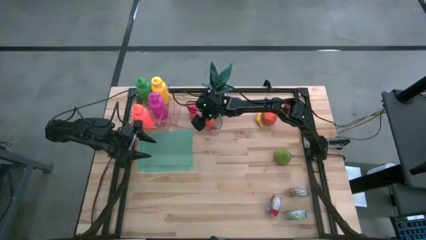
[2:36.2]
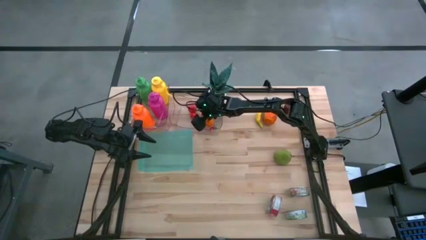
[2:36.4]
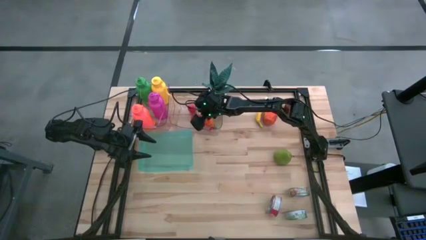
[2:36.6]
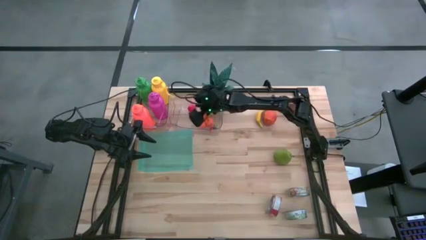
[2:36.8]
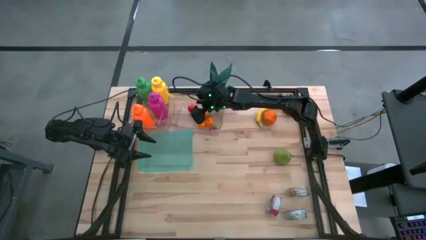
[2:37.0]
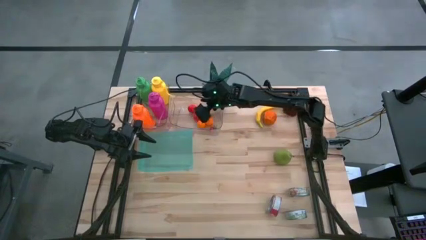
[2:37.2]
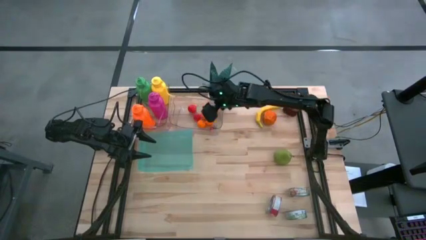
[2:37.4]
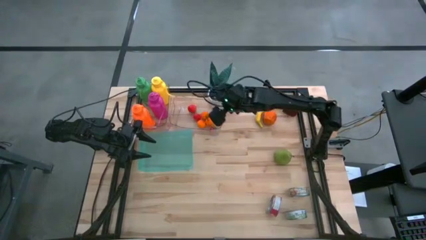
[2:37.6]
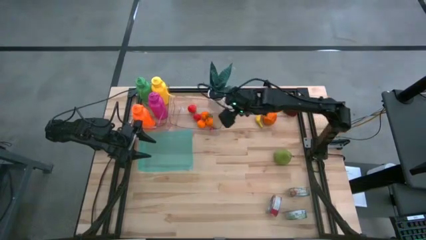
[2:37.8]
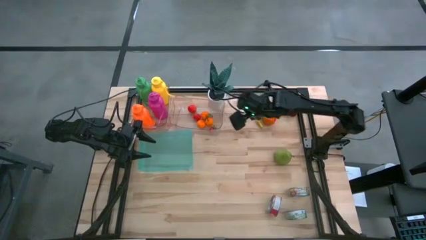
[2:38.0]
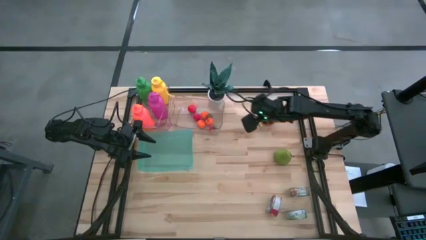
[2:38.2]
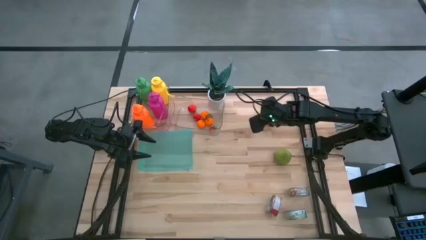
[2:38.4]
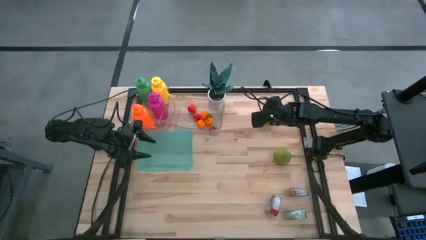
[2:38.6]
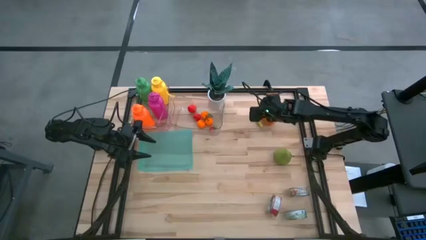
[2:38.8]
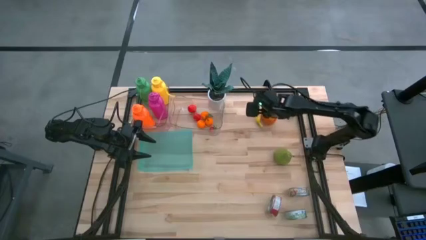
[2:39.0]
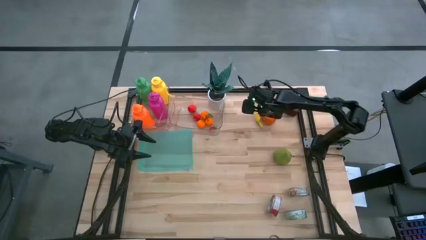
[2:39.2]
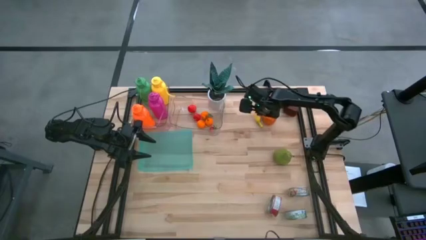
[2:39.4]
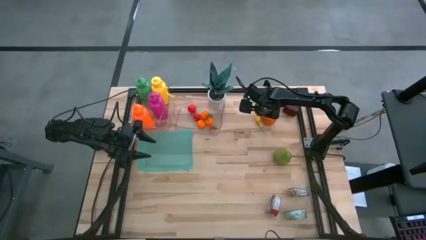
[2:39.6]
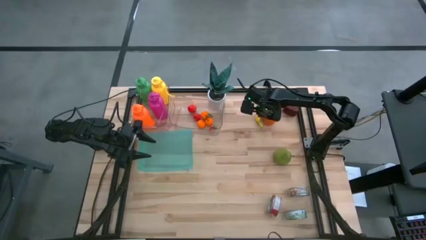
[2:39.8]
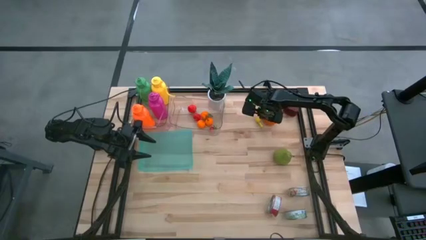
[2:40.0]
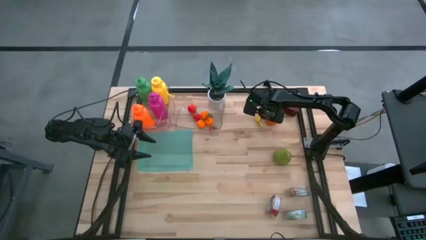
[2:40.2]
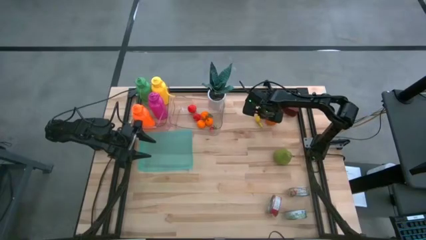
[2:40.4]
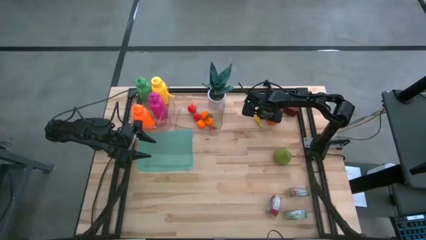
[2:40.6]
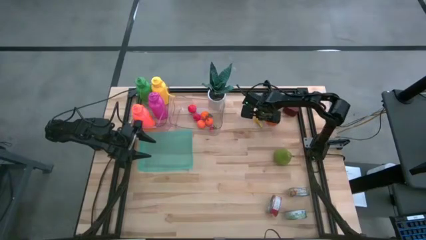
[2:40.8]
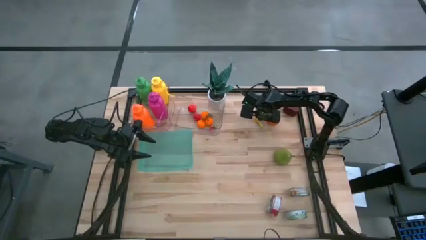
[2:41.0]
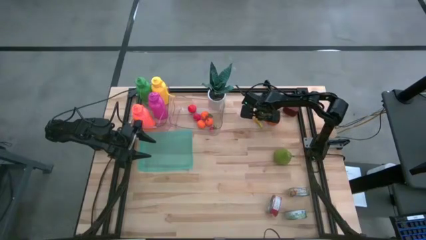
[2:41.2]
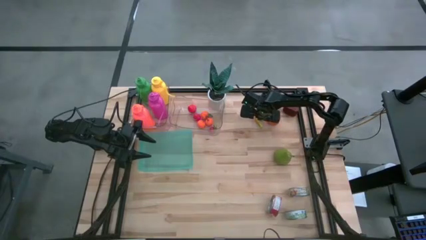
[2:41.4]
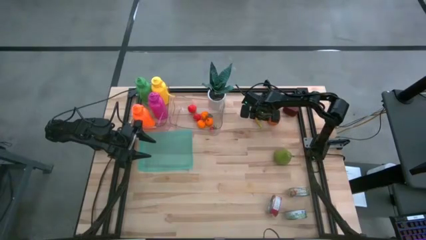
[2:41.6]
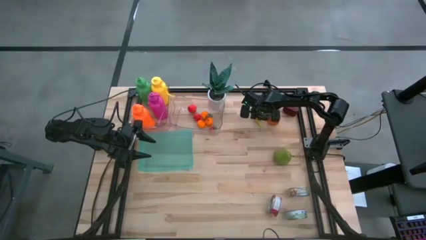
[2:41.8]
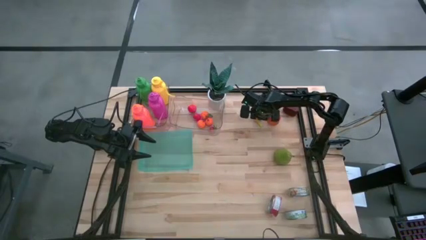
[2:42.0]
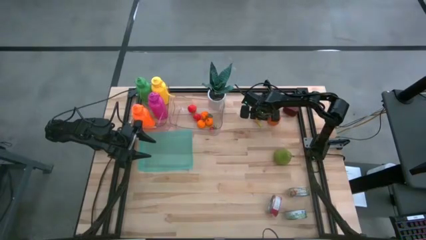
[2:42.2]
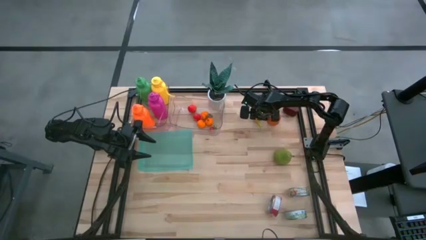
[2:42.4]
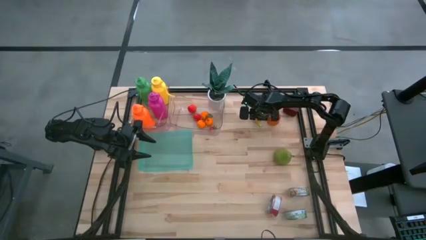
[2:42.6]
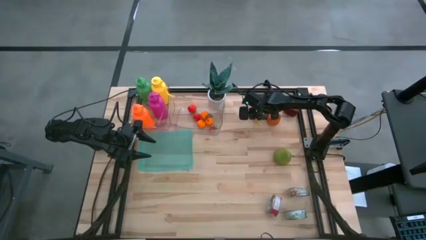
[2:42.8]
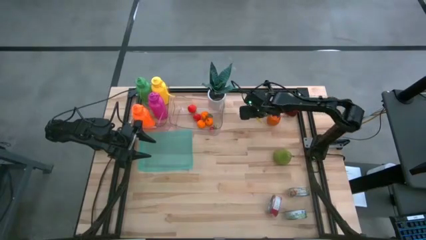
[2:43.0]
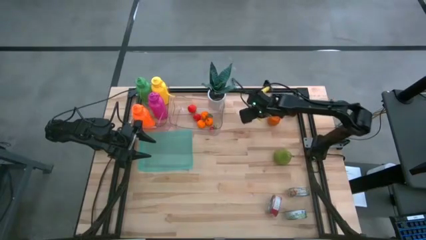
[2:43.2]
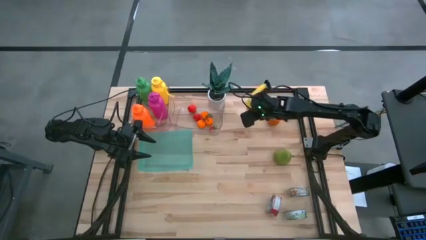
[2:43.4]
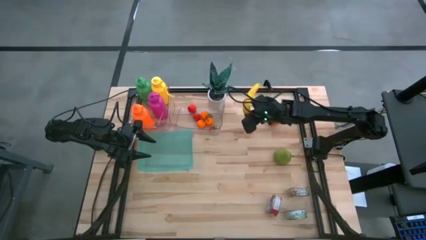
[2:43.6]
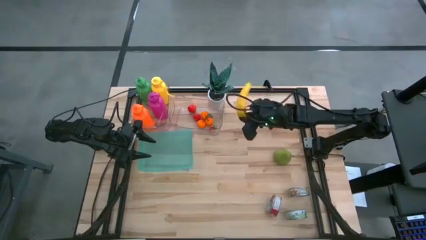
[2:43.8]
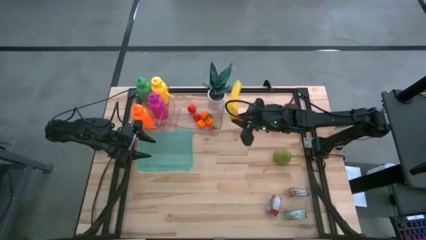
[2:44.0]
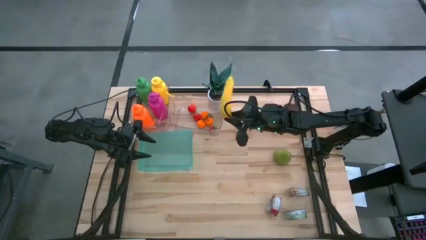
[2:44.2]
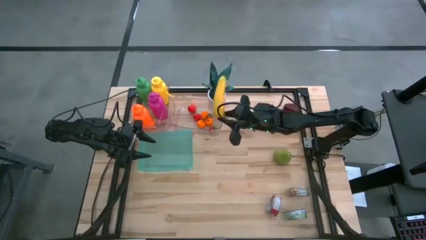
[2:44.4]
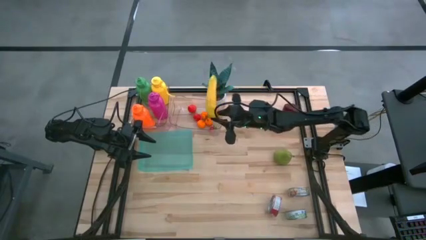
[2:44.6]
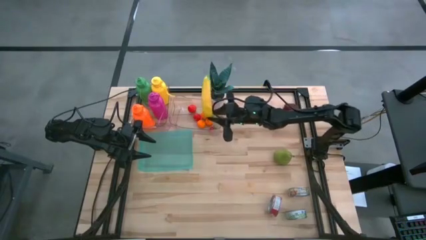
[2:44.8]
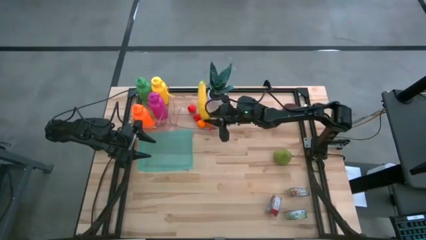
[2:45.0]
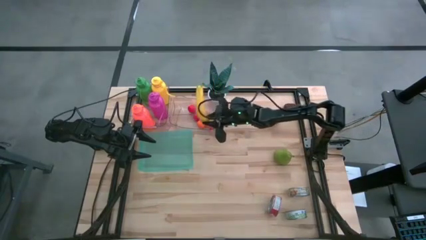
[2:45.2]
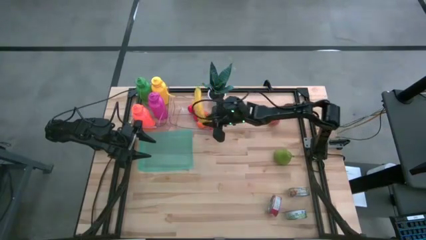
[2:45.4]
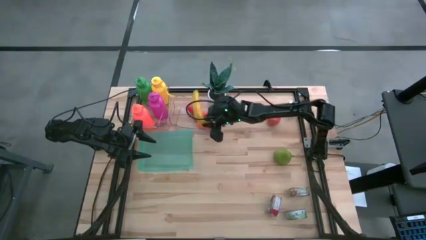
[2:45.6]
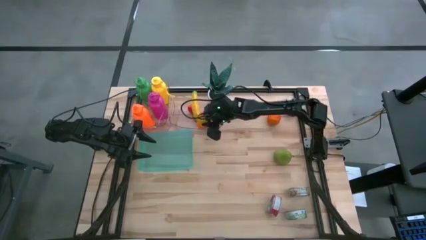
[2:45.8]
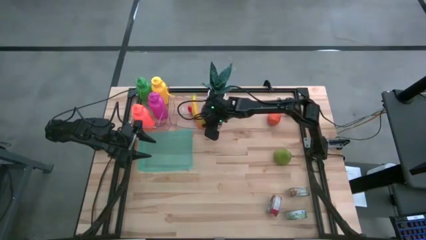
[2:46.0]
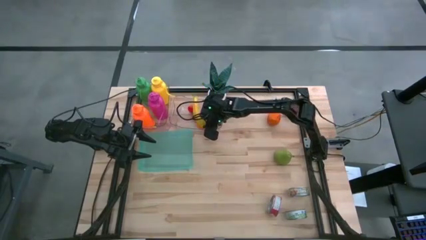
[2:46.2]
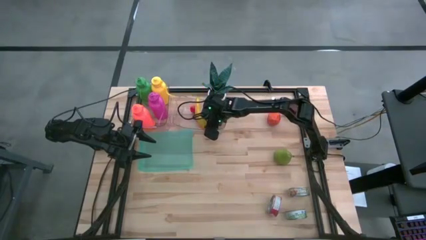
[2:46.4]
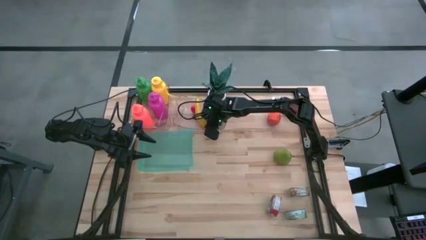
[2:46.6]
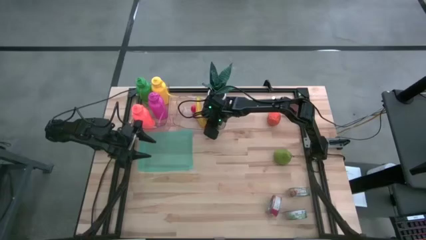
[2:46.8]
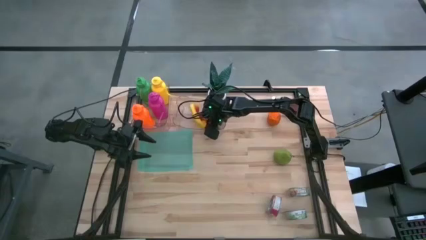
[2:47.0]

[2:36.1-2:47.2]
Task: Pick & Place Food Item
Put the yellow banana into the right transparent bin

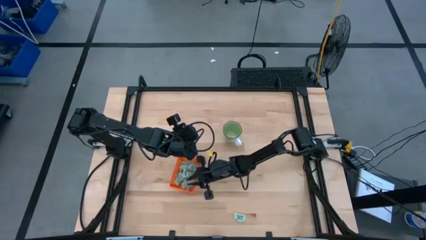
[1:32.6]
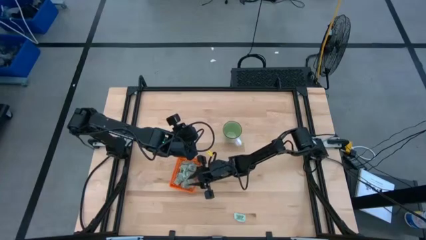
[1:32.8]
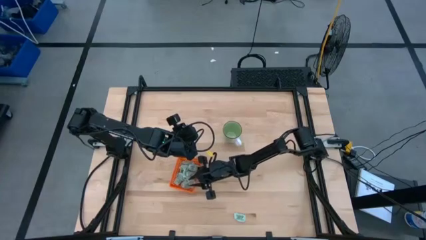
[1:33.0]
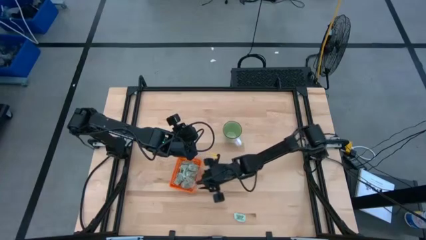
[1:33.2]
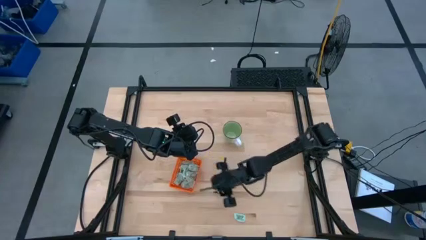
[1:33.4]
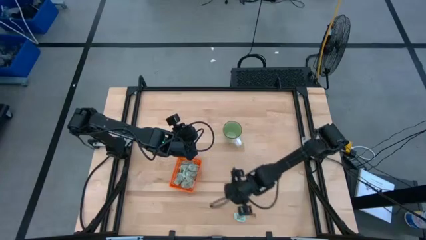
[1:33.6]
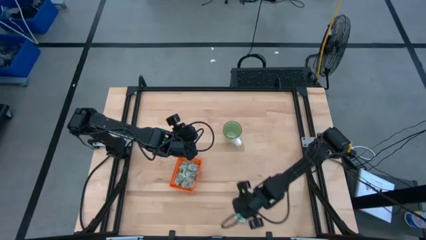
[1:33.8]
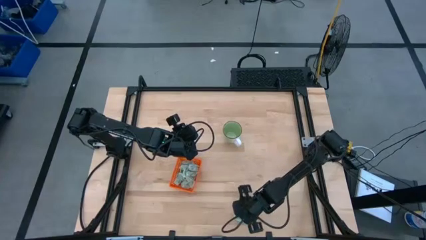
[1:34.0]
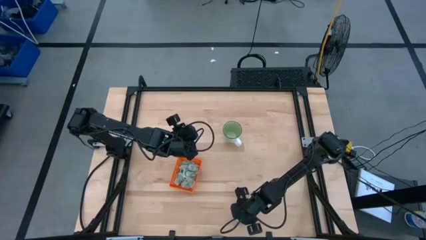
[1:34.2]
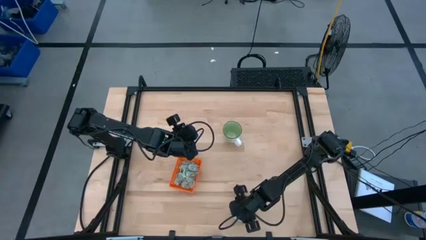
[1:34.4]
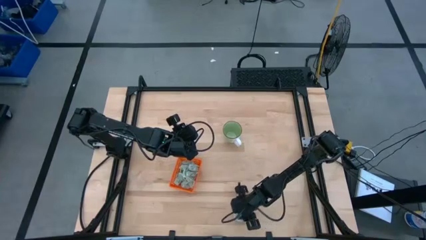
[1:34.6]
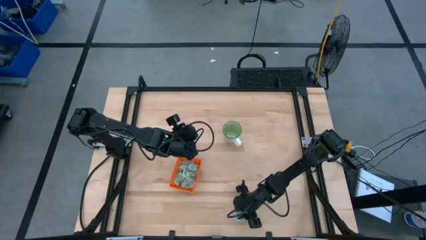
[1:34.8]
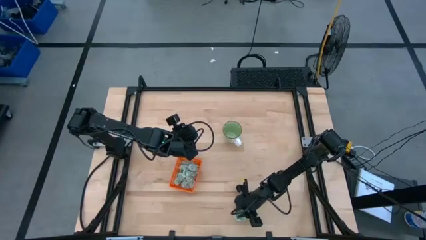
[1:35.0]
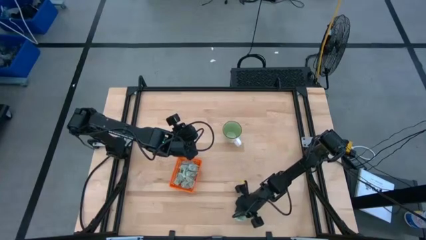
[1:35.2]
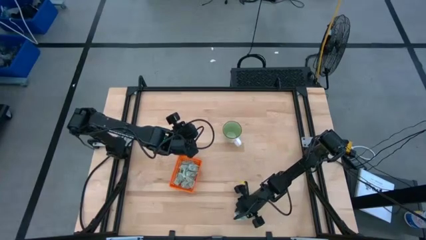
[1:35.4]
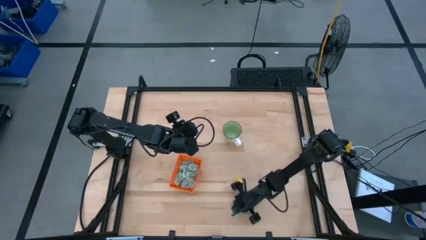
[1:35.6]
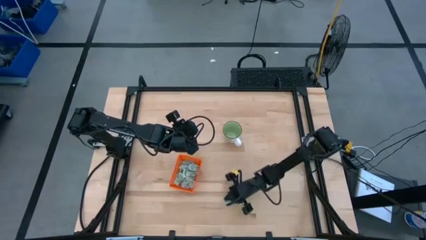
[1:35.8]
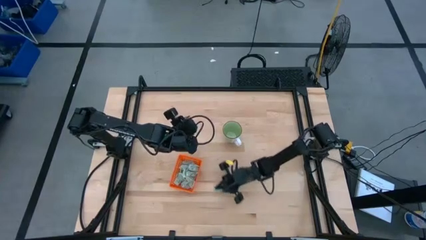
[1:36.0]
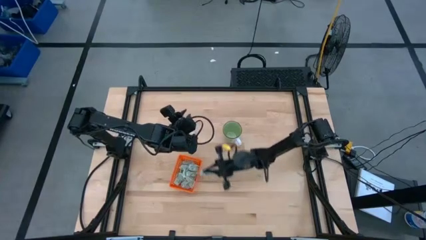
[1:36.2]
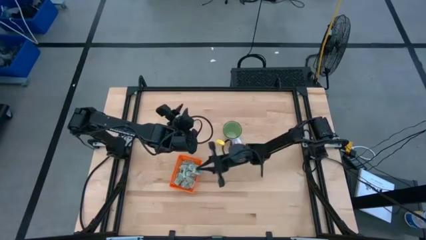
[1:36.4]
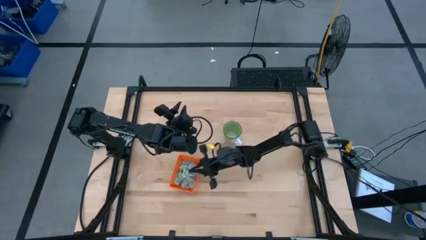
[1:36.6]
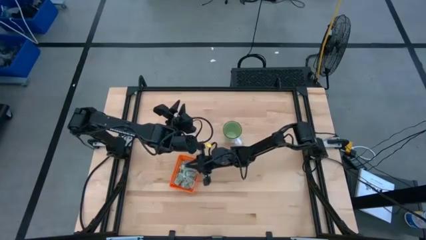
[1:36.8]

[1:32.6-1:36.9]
Task: Pick and place Stevia / Truvia into bins
Put the light green stevia packet into the orange basket

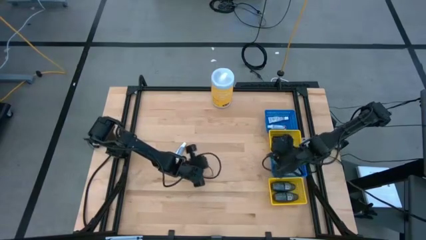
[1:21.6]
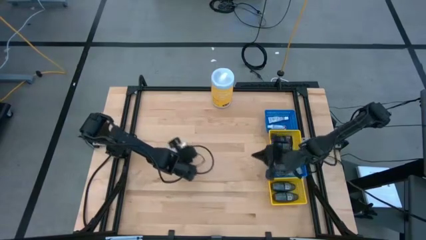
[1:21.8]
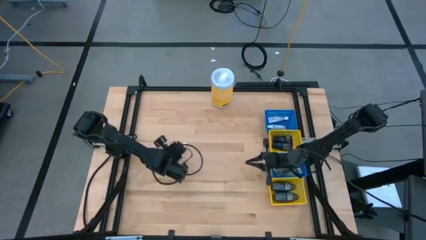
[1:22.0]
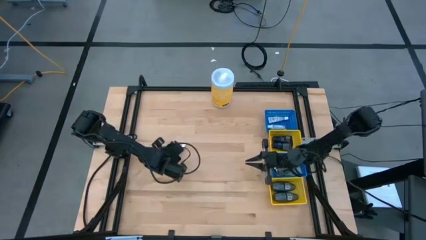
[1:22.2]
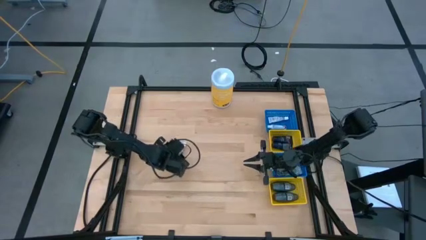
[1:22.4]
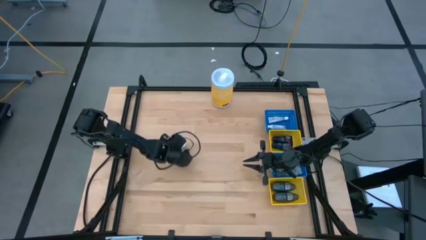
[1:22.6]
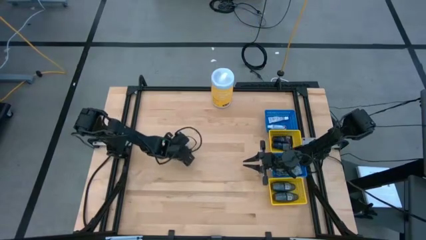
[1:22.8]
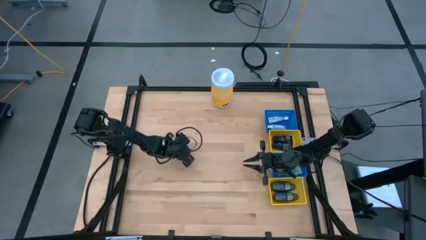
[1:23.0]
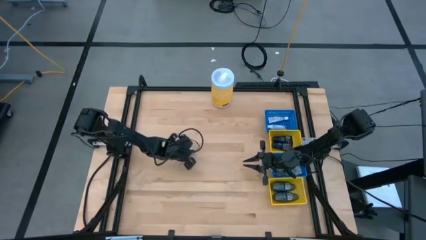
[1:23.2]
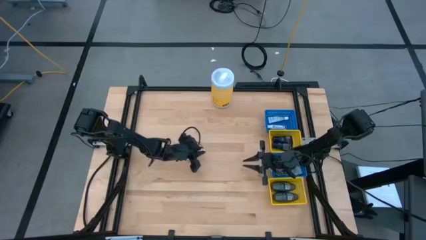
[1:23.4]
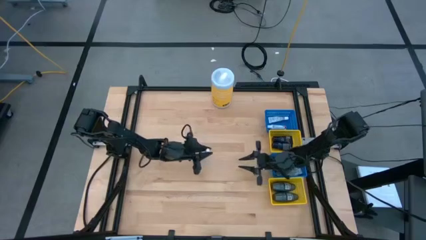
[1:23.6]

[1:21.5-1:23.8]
Task: Pick & Place Travel size toiletries
Put the white toothpaste into the top blue bin
